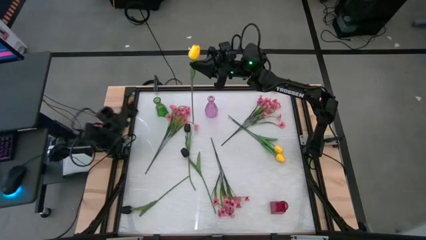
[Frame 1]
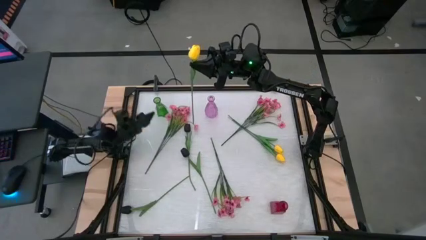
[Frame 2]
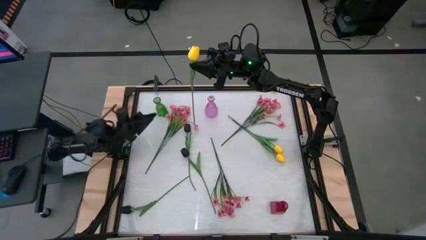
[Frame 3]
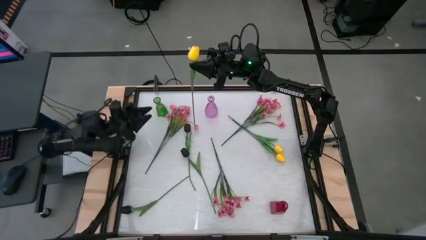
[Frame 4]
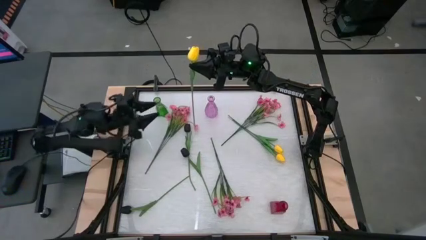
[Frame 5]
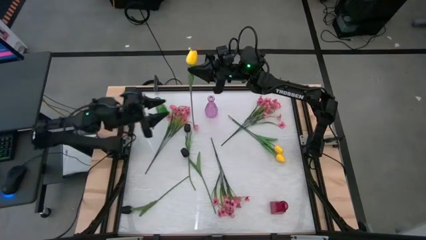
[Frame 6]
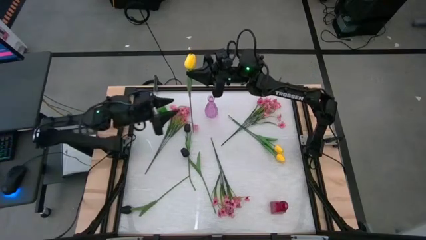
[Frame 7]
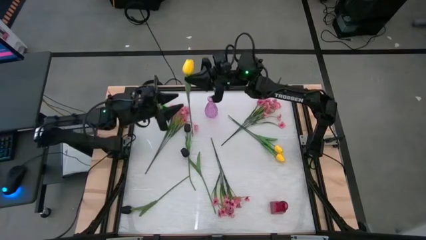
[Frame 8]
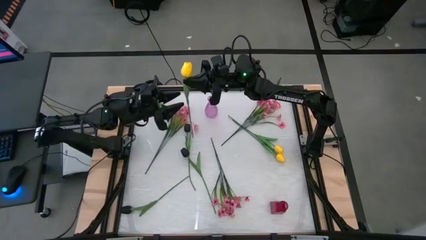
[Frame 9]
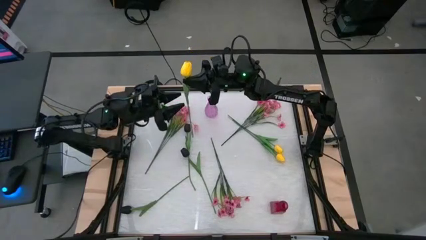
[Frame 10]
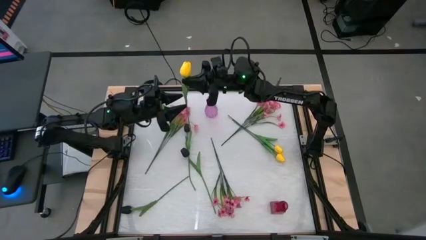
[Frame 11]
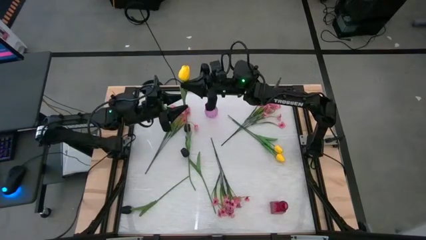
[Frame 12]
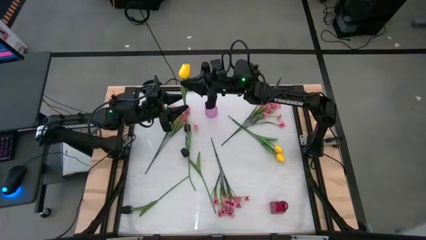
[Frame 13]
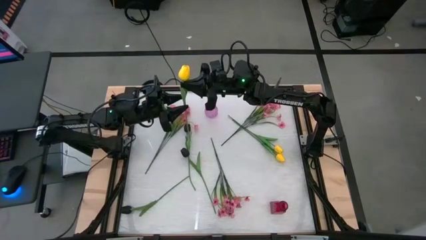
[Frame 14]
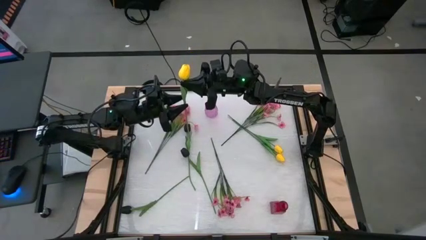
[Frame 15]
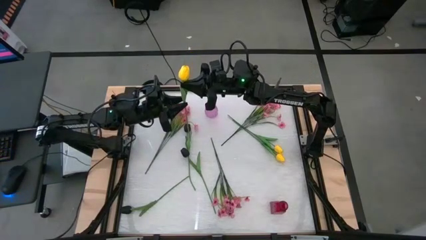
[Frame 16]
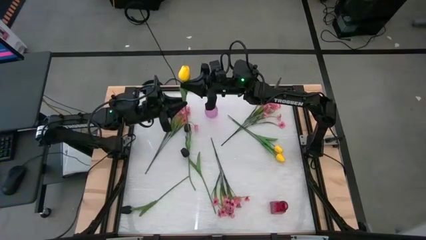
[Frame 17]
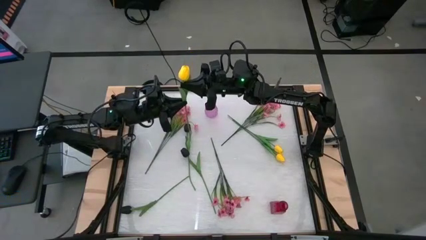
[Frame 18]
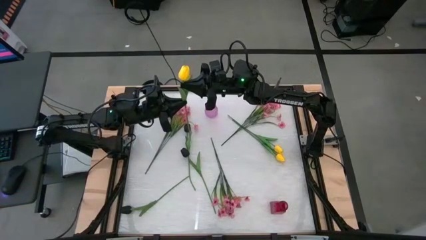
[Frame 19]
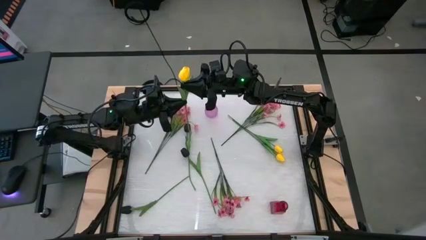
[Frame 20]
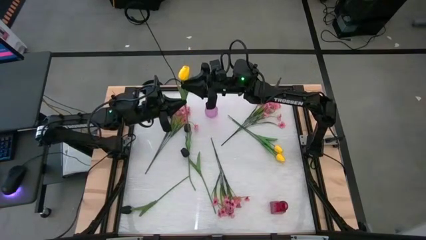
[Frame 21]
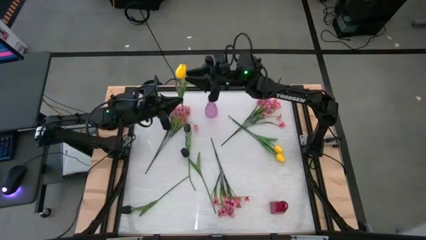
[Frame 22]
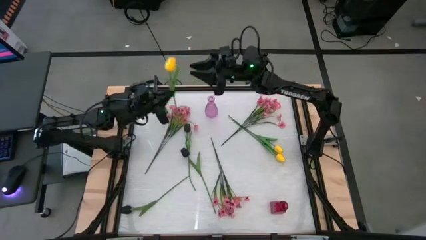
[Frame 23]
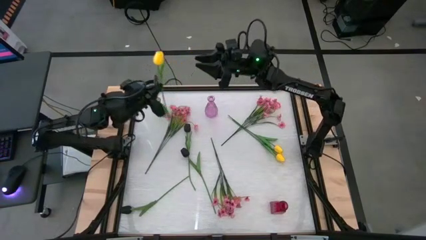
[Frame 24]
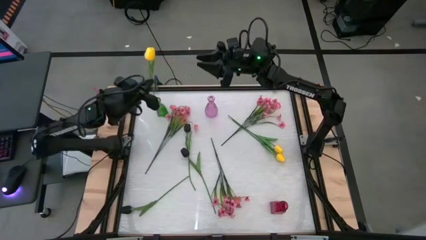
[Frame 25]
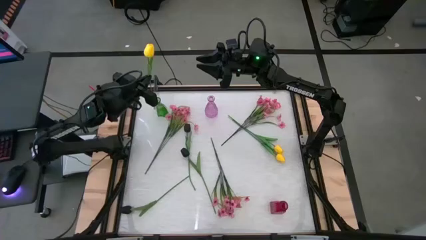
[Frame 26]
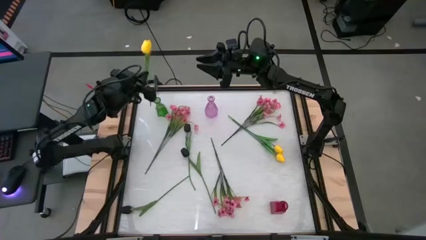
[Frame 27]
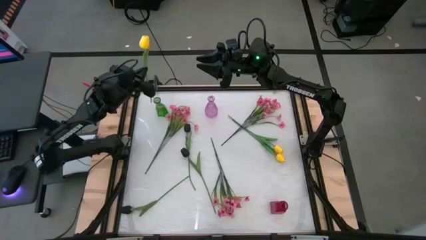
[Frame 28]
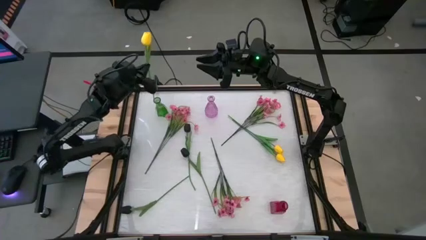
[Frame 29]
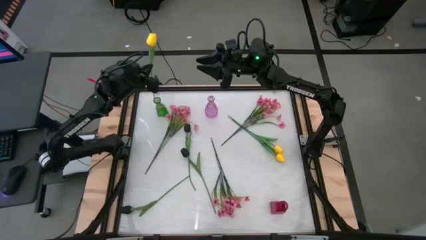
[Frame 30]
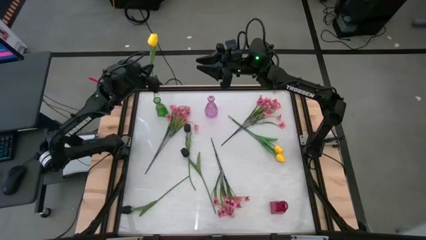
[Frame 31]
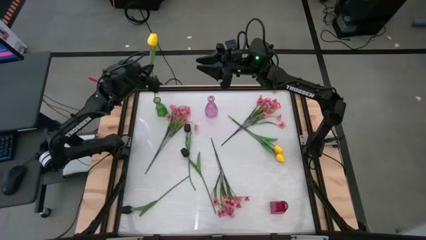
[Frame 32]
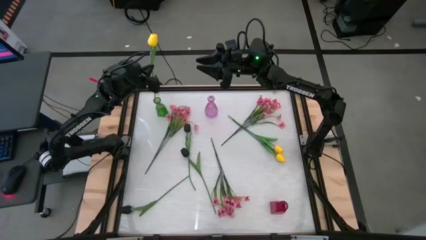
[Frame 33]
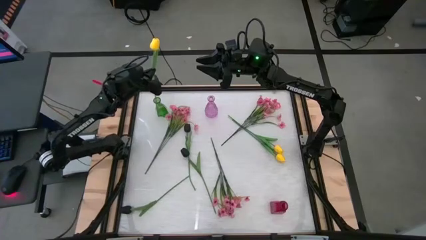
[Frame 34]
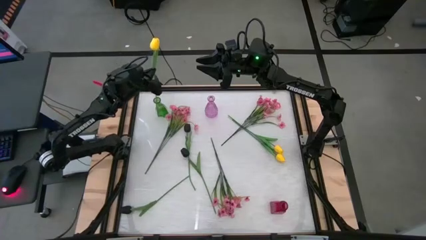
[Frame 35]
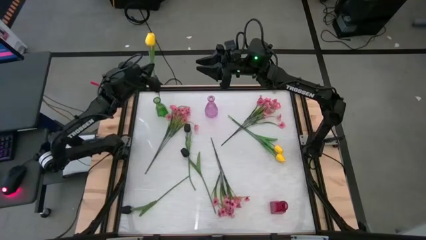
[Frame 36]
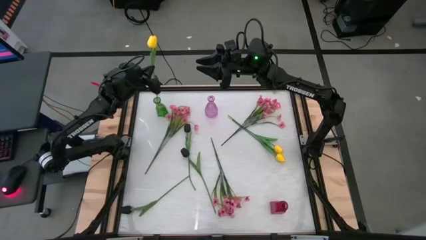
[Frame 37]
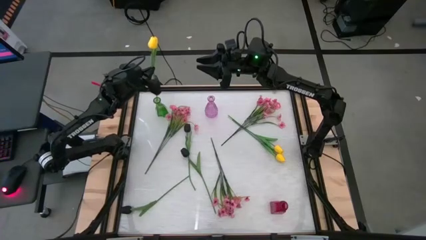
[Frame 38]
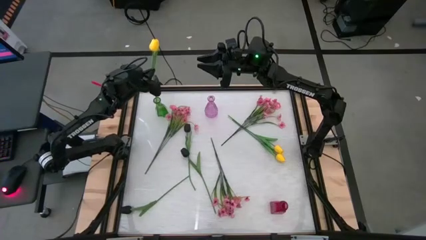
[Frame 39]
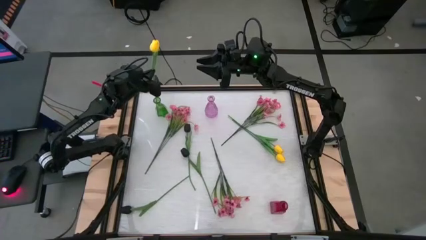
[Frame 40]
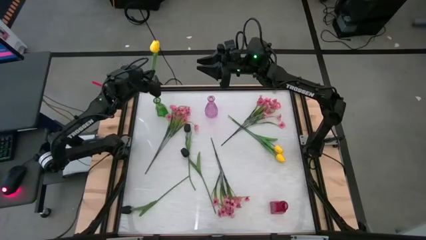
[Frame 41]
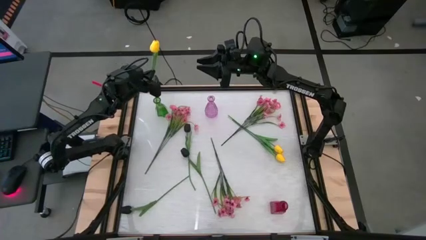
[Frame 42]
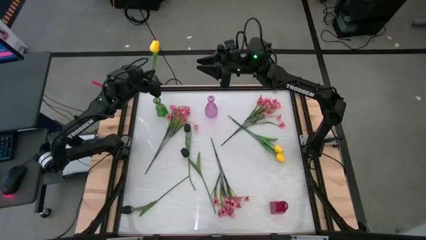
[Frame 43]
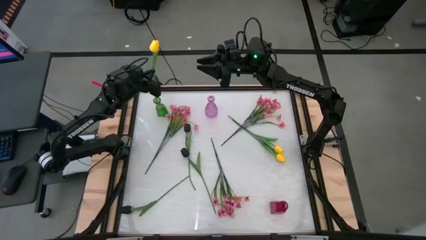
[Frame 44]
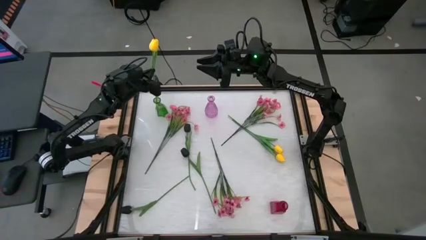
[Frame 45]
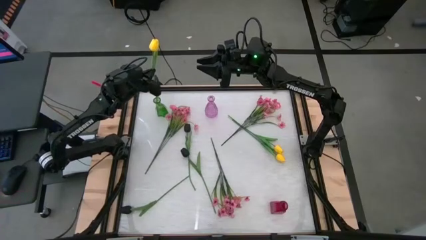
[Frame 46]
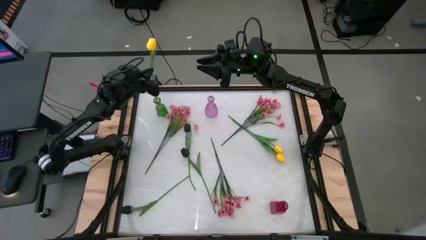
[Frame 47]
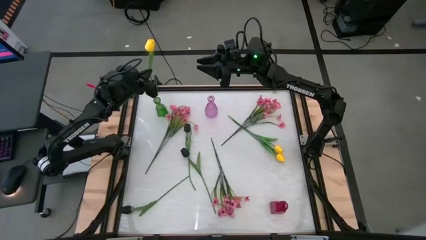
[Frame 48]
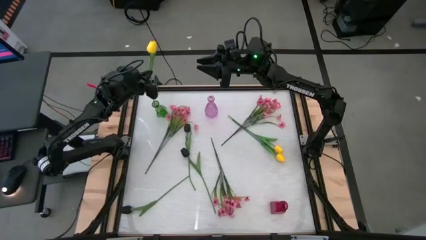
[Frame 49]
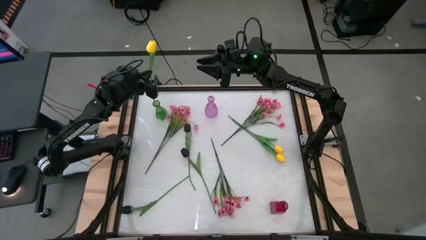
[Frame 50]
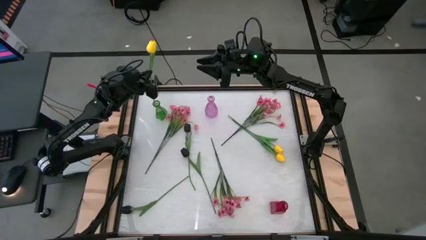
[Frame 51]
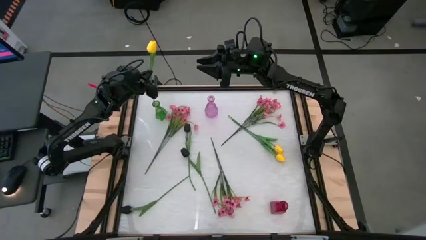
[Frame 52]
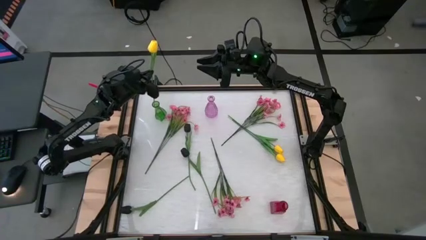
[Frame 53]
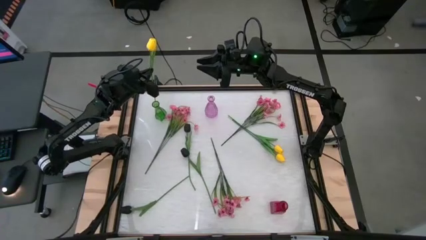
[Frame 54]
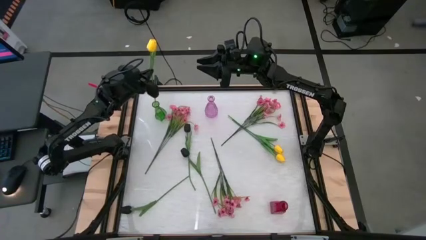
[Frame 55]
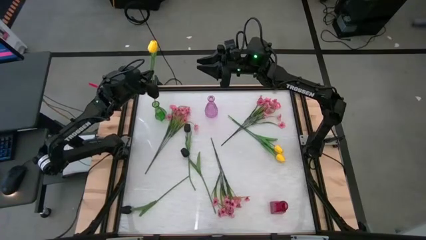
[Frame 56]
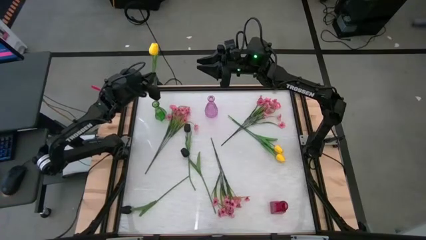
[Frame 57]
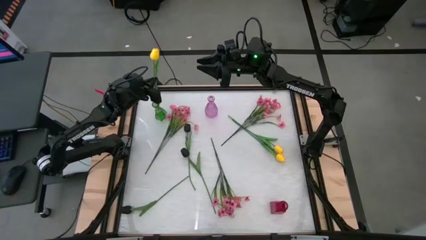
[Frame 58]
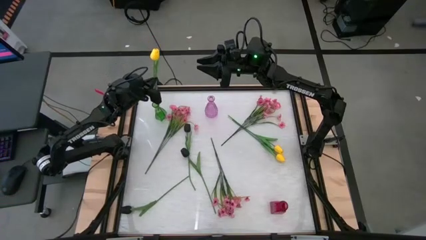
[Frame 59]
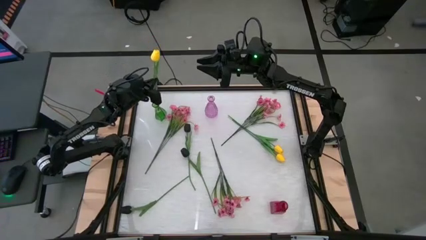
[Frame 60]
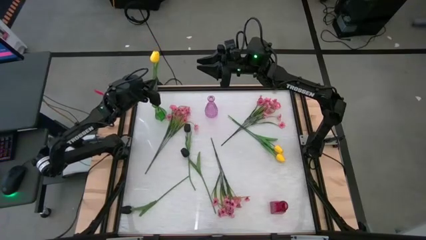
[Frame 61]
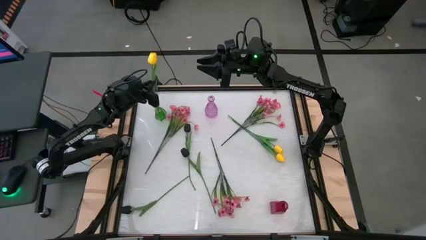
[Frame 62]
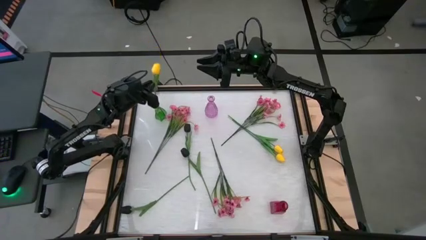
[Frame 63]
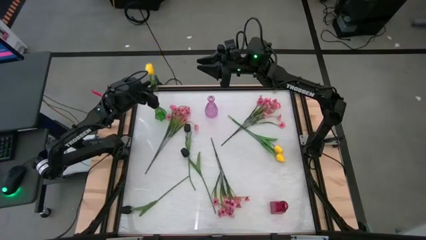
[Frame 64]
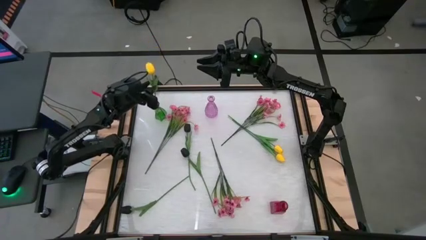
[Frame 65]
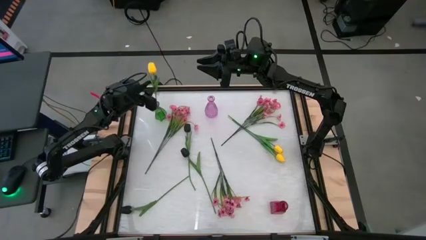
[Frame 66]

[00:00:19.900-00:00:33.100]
Task: Sort flowers into vase by color
Put the bottom yellow flower into the green vase

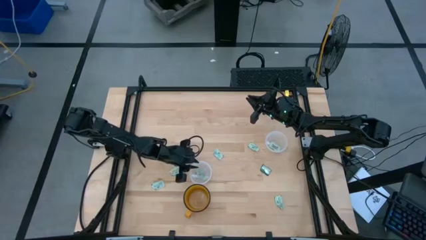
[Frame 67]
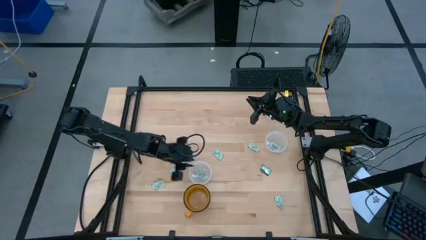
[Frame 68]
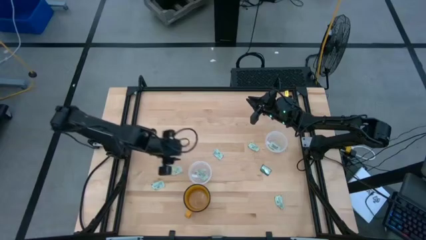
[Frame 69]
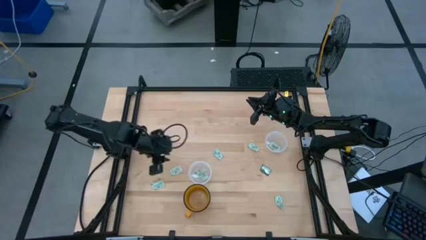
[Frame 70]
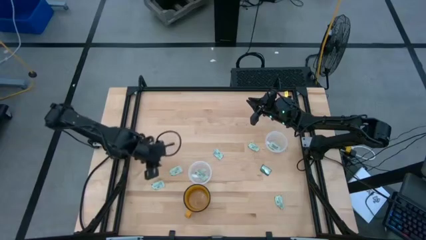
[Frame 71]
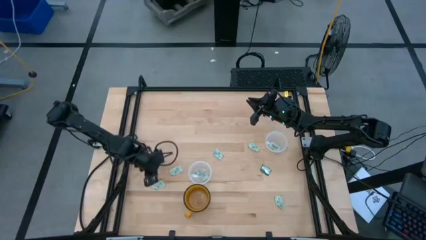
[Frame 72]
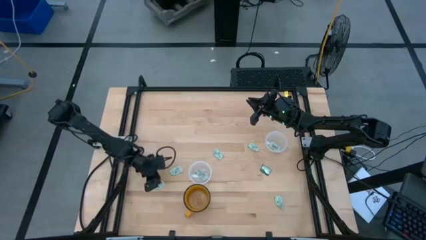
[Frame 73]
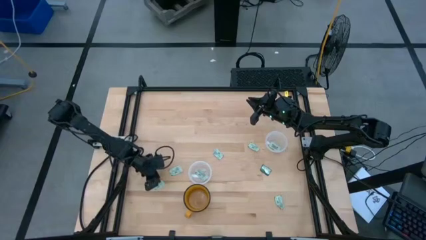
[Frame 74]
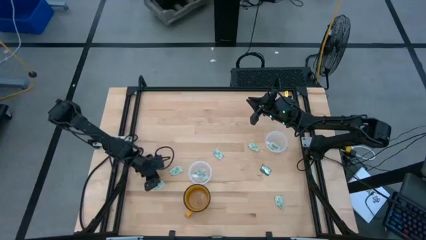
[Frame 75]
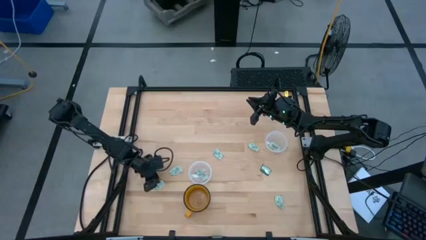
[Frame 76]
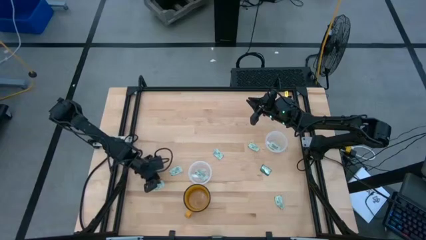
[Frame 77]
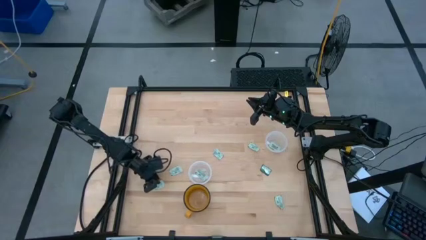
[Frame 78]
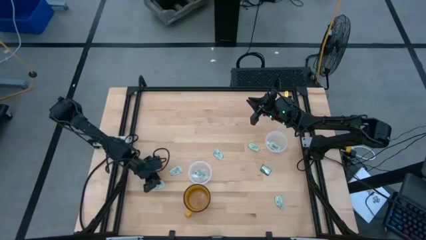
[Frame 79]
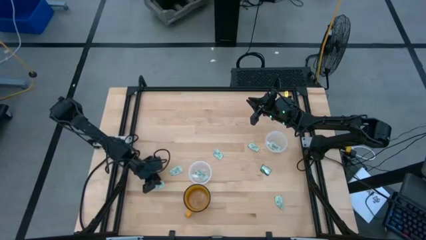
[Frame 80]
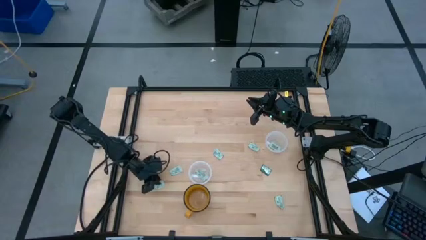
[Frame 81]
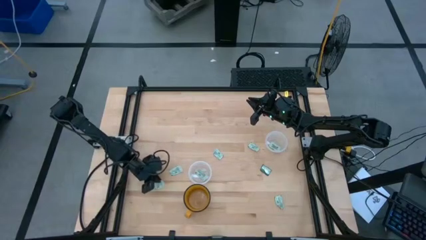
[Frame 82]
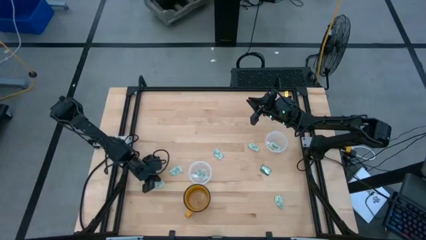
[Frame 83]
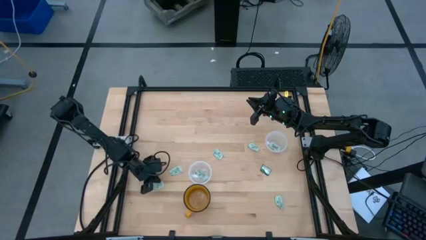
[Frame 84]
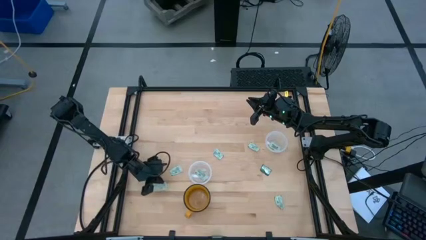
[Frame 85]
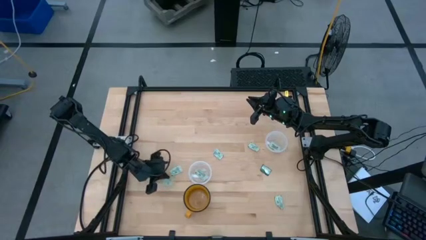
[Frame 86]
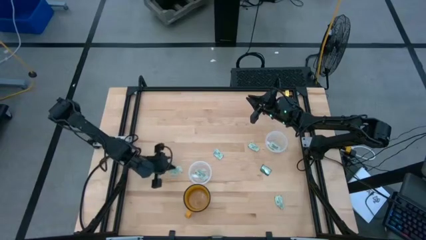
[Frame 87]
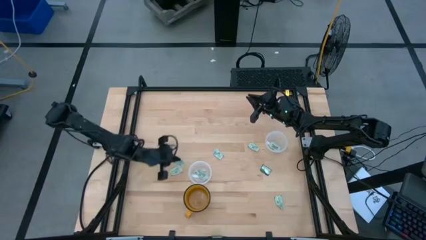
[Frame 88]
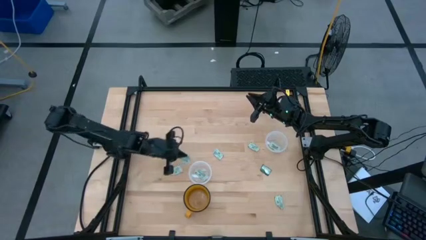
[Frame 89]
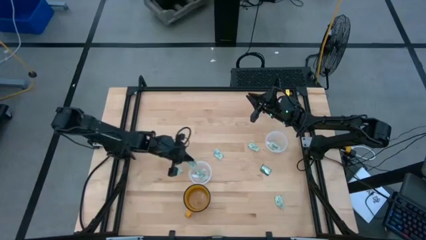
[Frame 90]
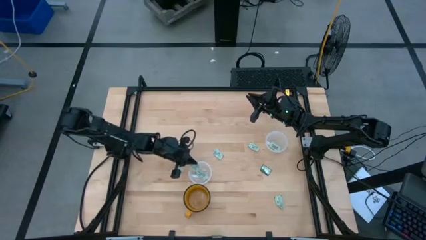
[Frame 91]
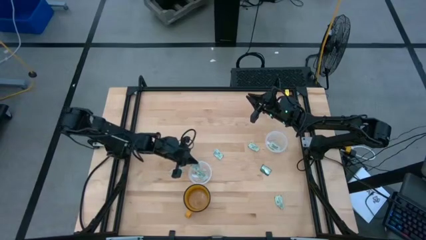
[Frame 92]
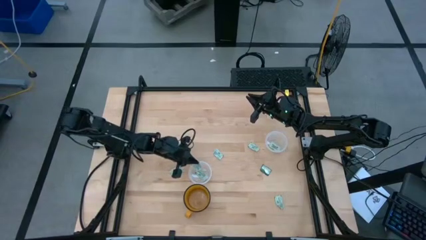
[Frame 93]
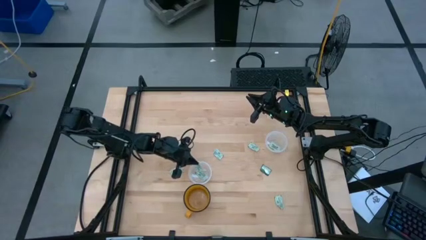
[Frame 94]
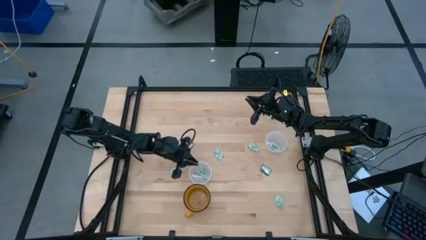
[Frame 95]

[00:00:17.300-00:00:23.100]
Task: Pick and place items into bin
Put the stevia packet into the left transparent bin
